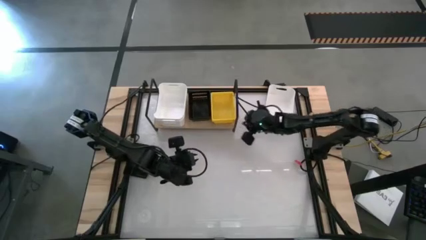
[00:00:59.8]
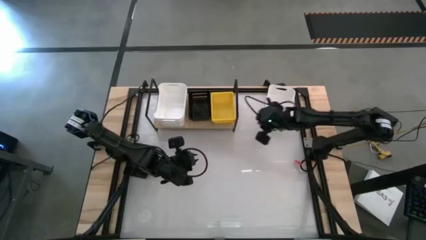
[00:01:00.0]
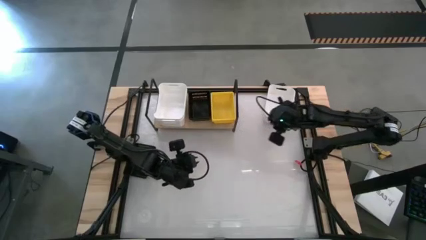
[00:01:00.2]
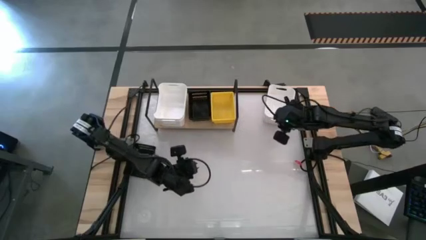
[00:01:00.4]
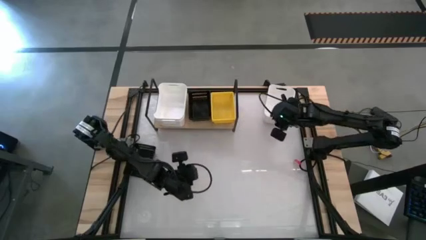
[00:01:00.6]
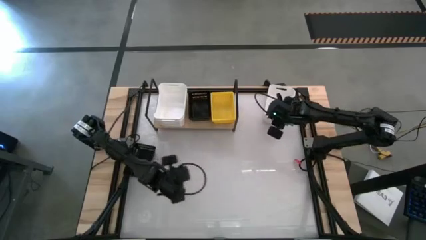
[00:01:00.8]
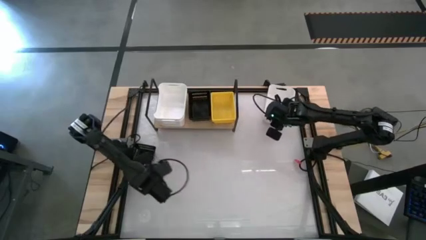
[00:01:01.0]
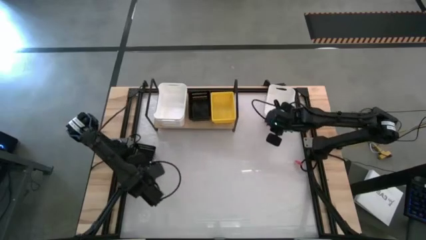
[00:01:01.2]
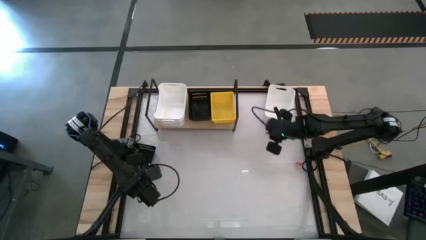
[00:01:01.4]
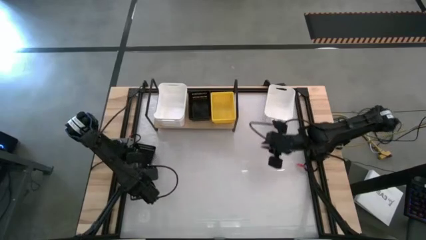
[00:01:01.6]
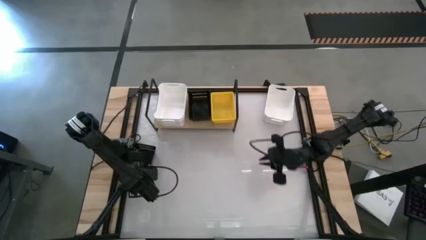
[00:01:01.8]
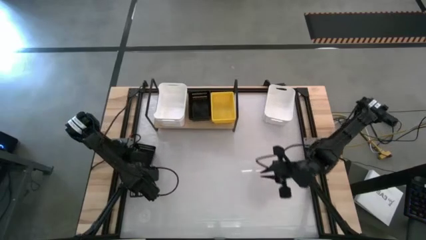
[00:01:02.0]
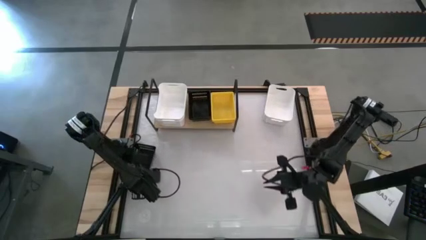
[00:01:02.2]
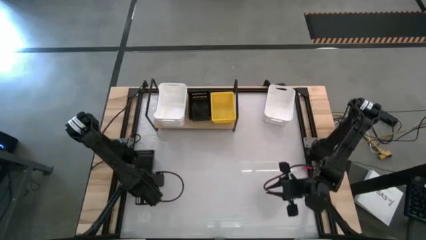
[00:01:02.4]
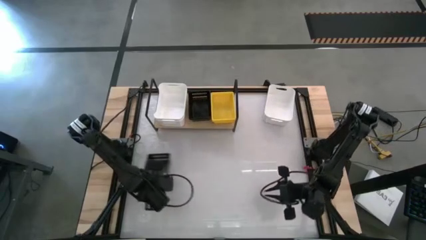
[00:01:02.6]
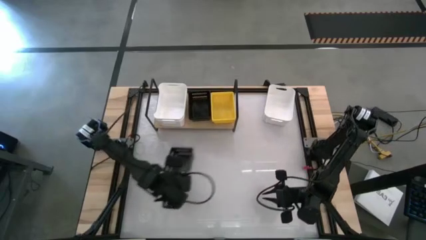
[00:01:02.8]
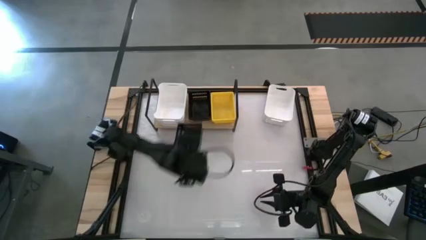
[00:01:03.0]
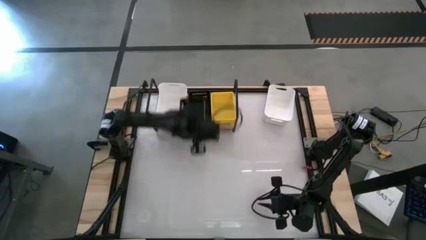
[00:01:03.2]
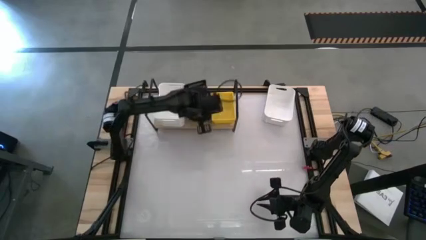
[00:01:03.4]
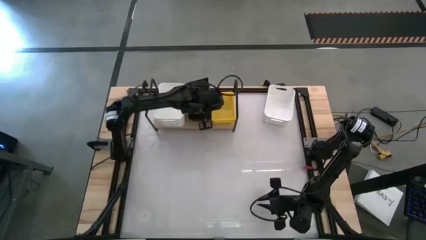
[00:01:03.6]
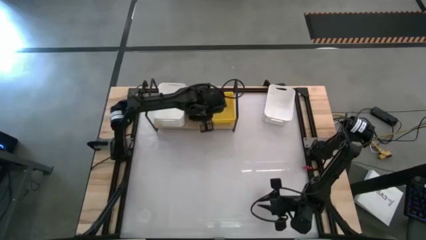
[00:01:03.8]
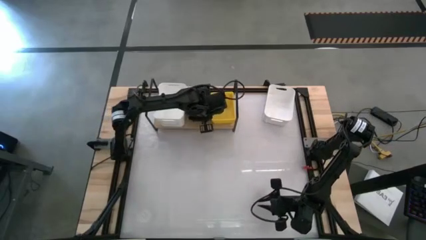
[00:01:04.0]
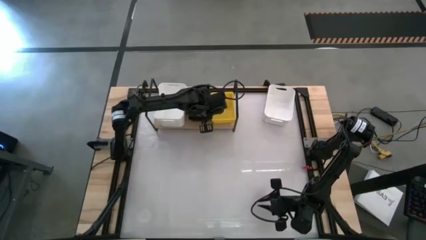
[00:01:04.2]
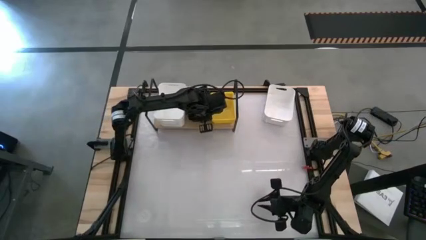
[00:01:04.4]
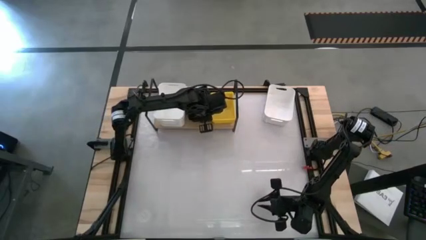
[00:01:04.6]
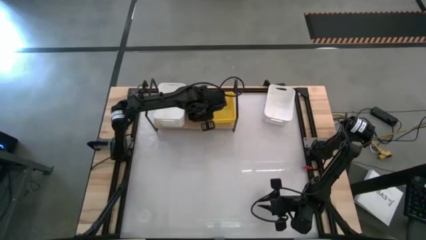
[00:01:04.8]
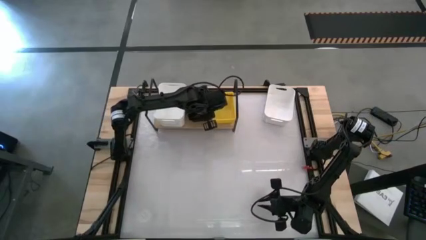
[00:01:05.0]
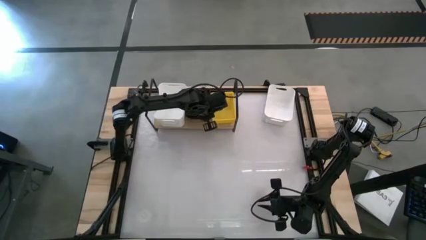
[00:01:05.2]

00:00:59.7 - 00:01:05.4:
Task: Stack baskets on shelf by color
Stack the black bin on top of the black bin

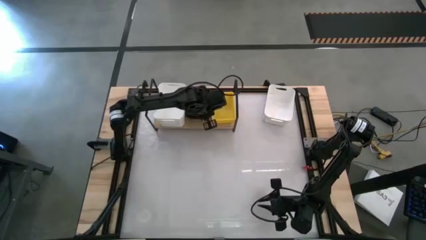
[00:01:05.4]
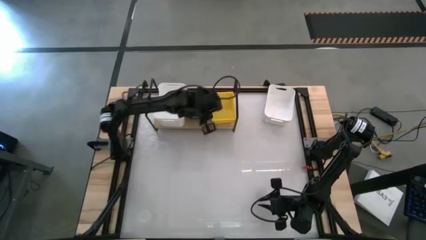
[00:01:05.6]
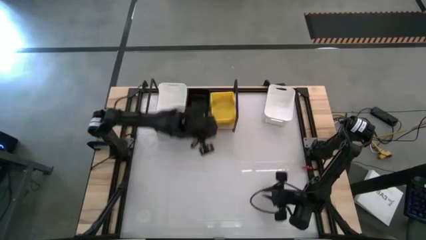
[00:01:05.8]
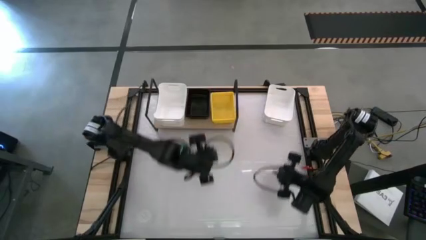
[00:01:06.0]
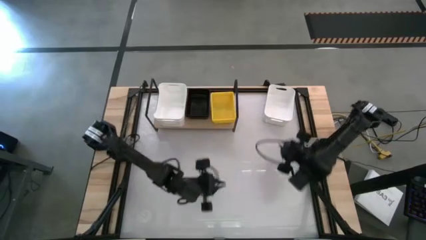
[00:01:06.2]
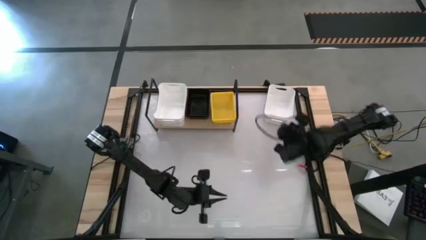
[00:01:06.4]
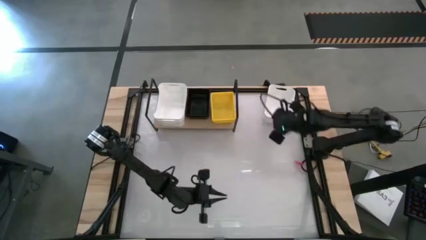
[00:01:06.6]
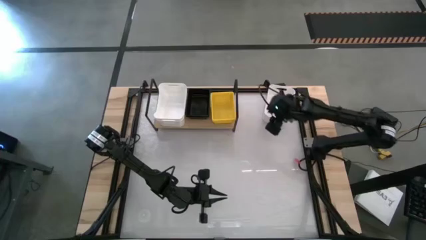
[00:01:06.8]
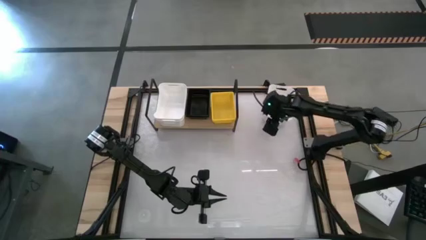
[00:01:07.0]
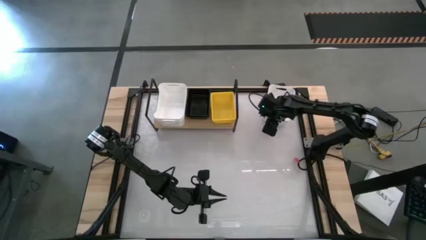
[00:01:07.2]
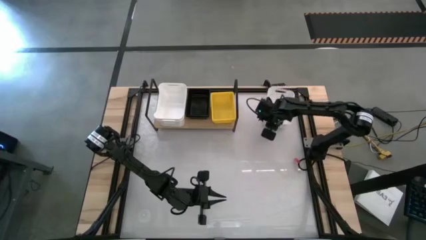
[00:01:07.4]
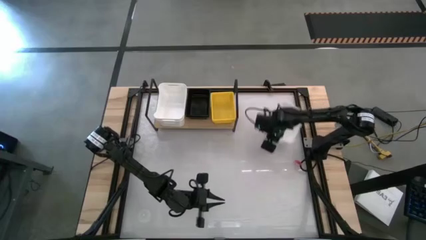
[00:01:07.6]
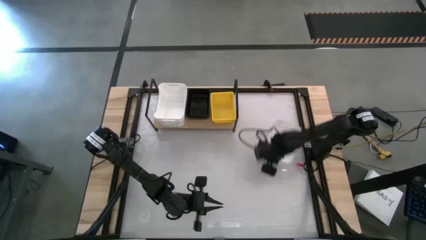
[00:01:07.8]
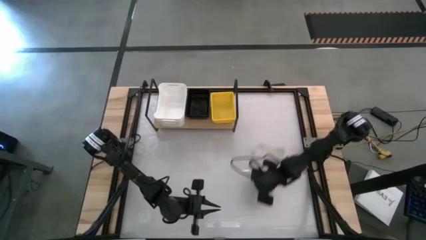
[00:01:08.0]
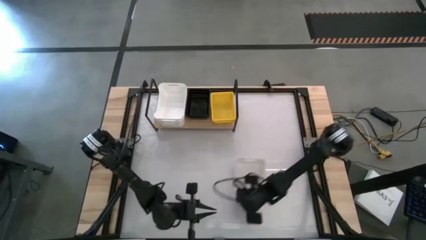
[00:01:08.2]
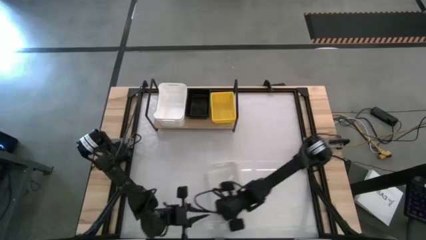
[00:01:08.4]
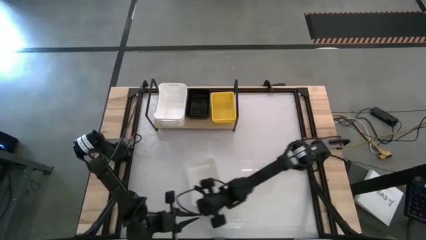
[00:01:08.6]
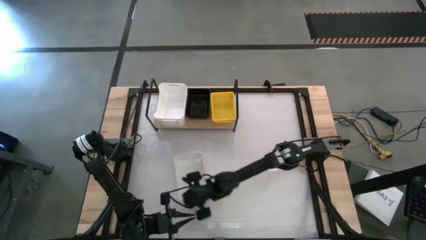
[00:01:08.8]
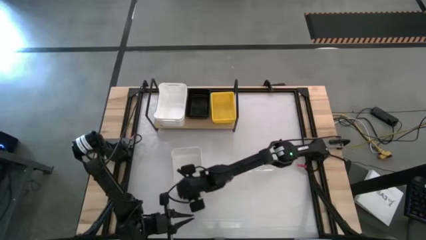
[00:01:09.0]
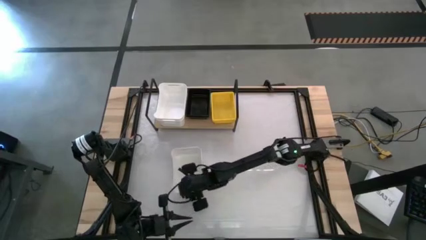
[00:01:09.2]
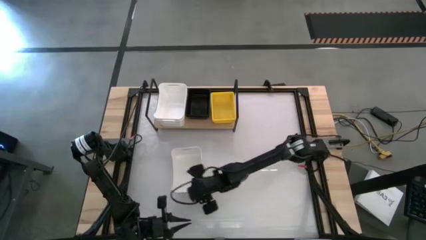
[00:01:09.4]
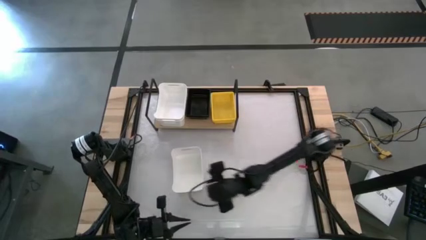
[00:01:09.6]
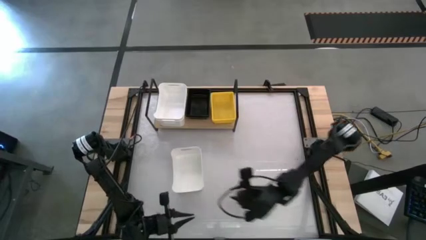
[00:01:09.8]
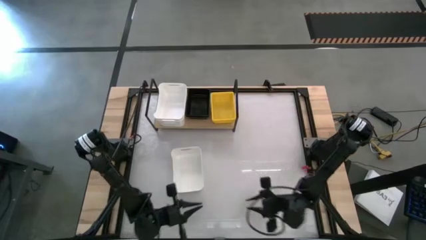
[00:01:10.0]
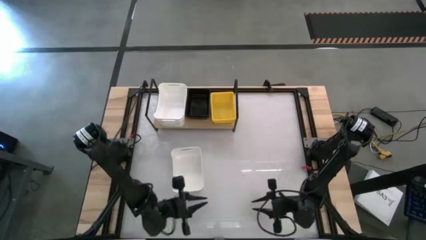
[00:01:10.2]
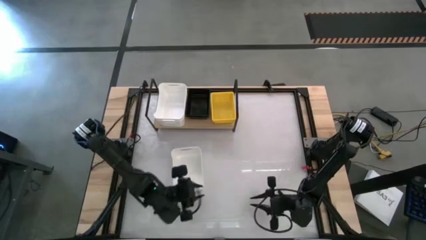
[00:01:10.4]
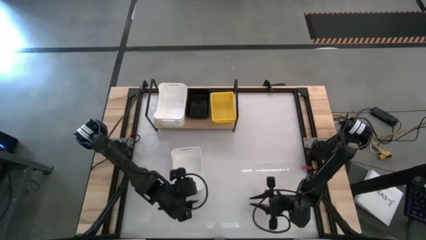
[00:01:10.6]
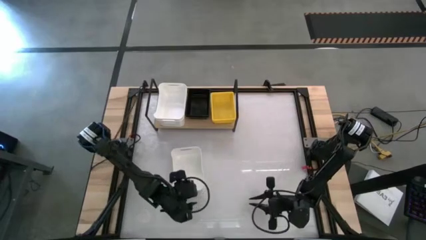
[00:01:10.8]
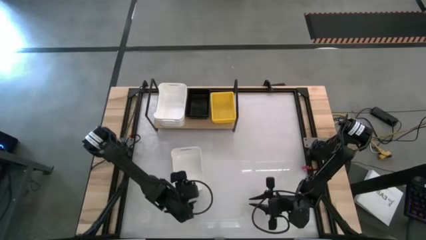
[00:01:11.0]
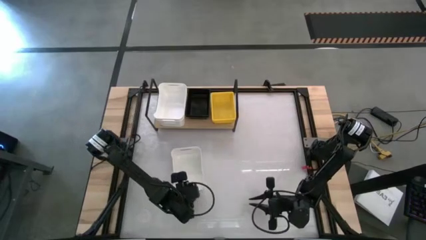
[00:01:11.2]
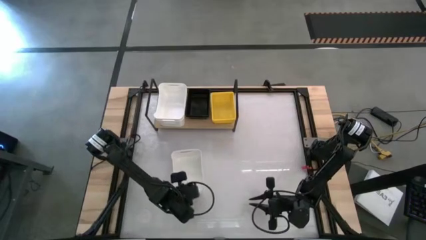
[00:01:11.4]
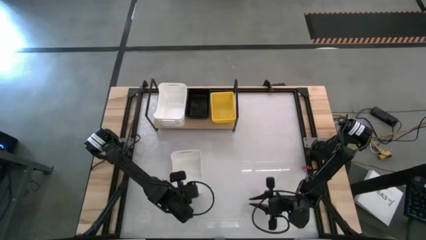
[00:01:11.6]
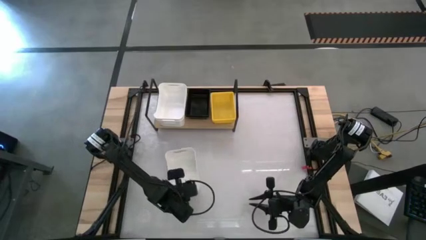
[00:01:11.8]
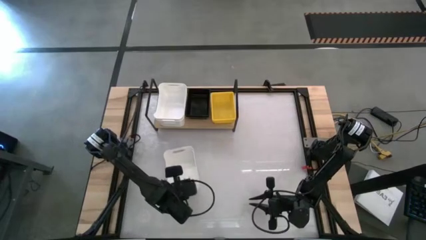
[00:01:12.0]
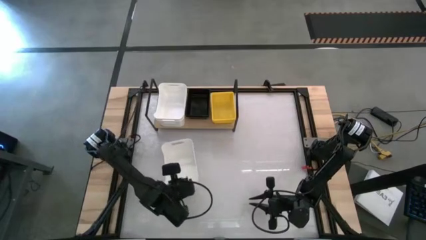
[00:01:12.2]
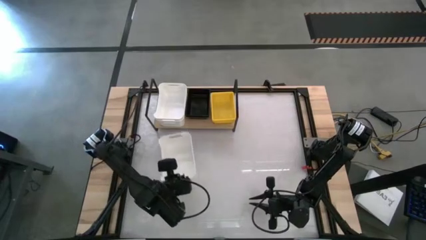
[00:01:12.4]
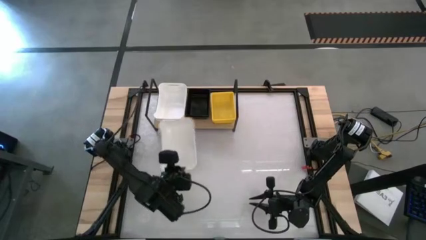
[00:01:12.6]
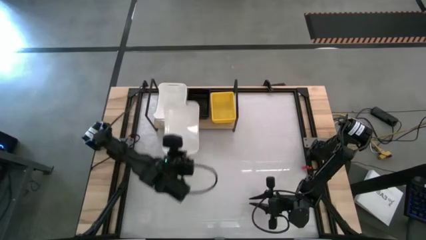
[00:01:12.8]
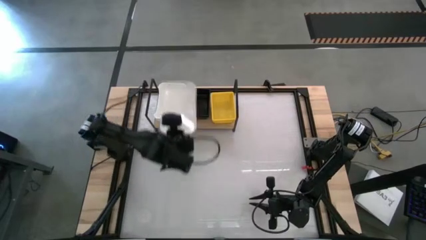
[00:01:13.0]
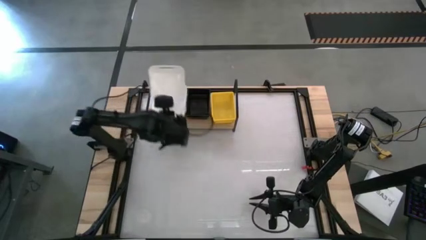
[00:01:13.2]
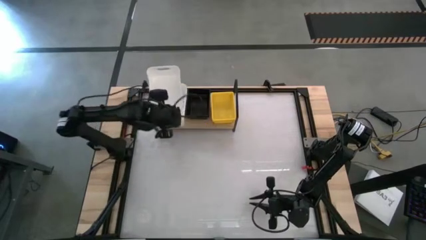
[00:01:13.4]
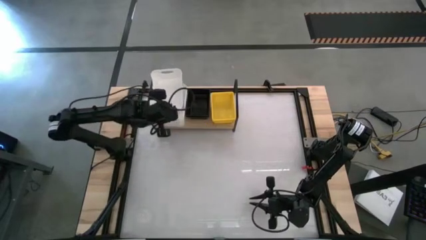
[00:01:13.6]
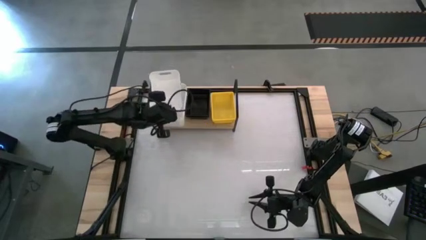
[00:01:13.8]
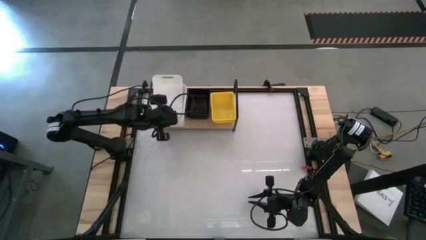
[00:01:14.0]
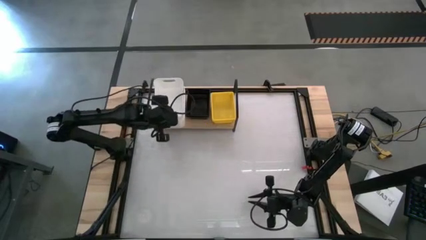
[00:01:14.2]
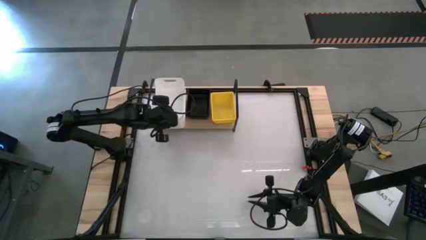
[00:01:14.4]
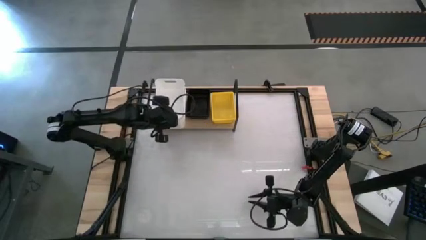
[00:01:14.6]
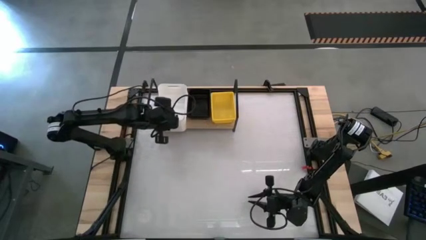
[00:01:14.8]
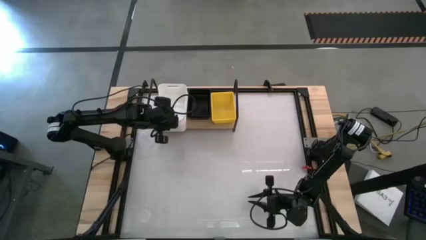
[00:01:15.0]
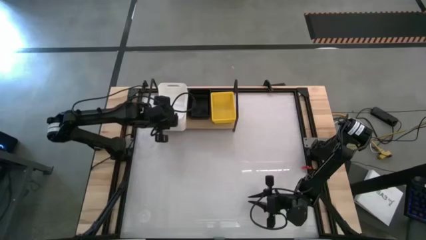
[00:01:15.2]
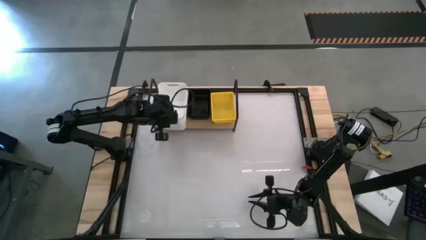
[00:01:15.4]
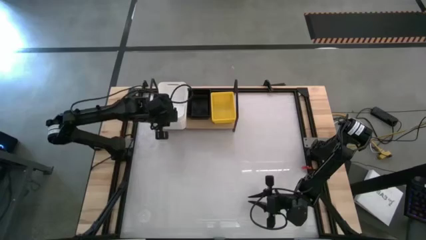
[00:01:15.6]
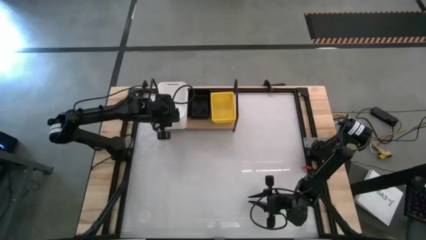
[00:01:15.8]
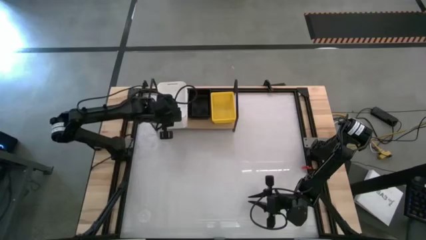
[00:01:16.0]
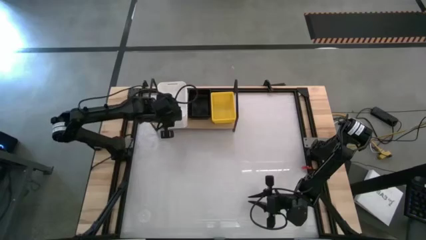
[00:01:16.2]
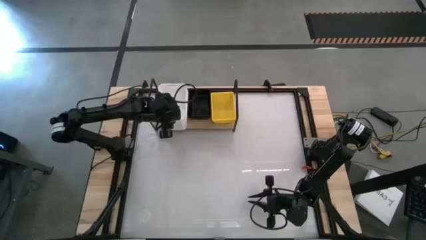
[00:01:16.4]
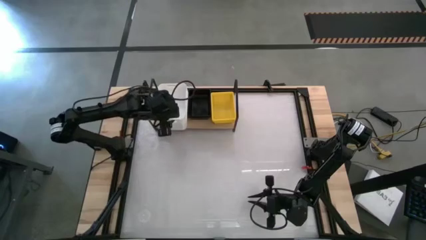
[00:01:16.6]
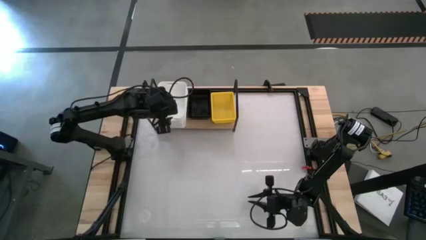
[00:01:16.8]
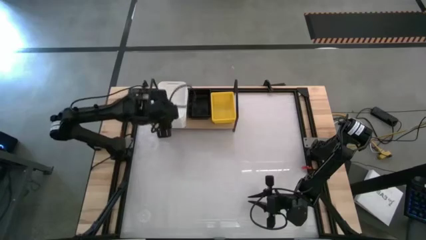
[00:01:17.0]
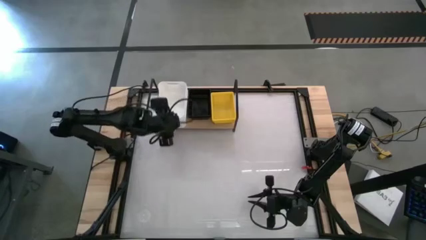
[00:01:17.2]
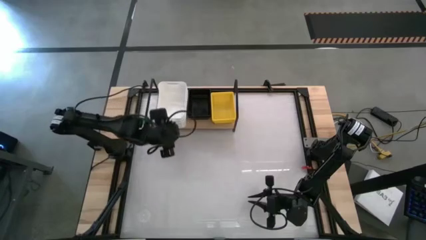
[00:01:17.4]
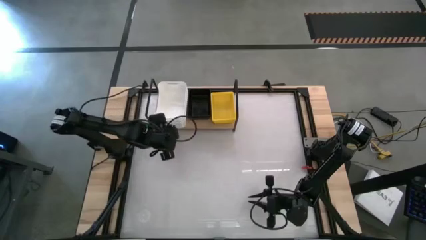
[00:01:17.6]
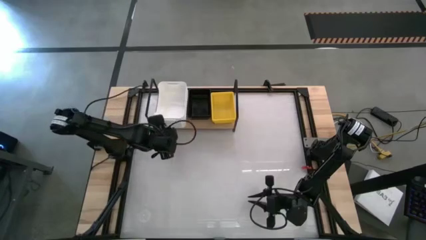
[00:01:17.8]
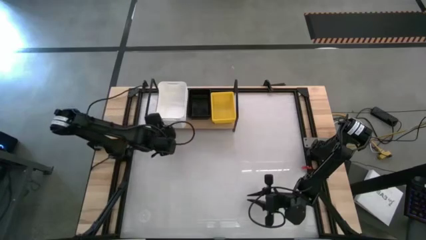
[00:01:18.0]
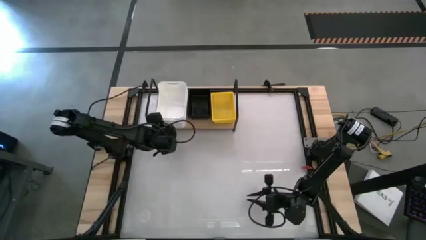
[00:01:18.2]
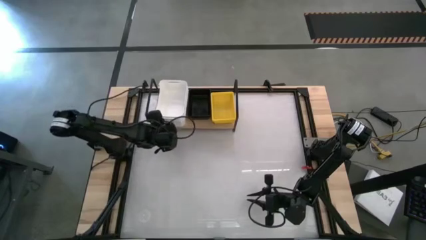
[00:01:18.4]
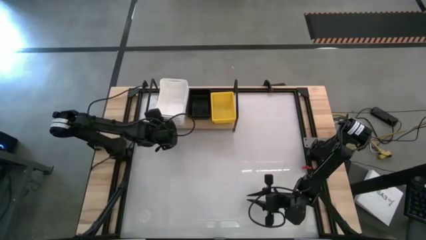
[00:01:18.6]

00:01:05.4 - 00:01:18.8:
Stack the white bin on top of the white bin
